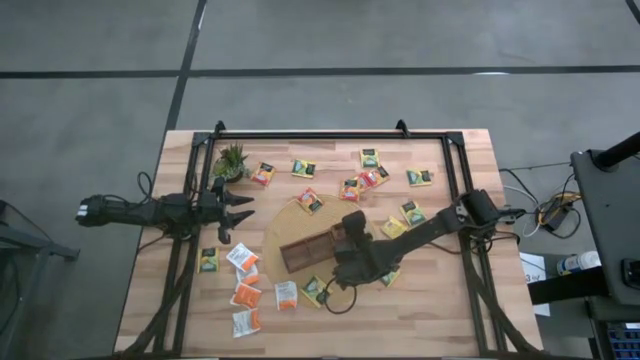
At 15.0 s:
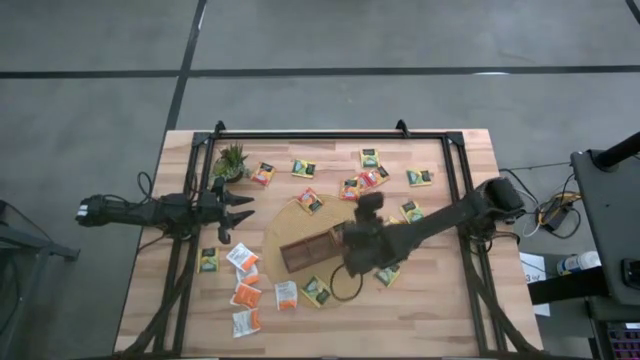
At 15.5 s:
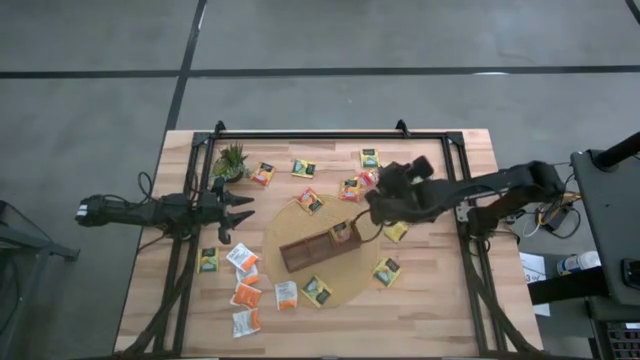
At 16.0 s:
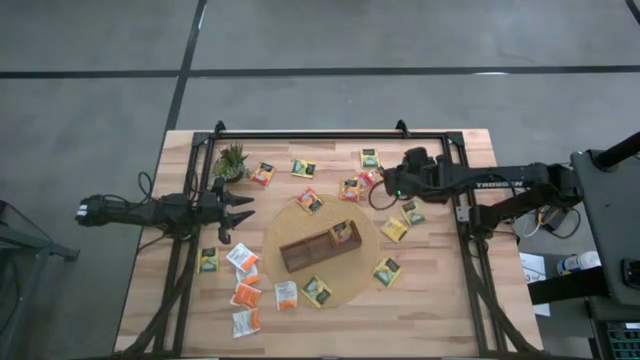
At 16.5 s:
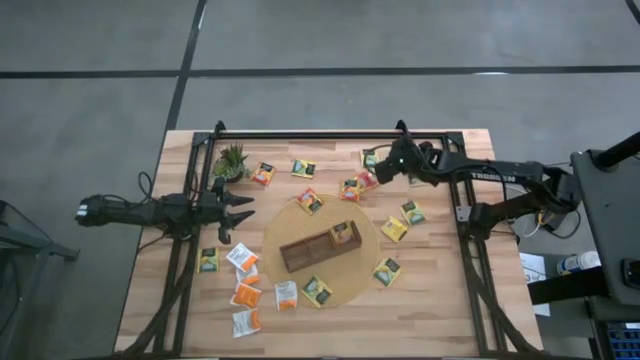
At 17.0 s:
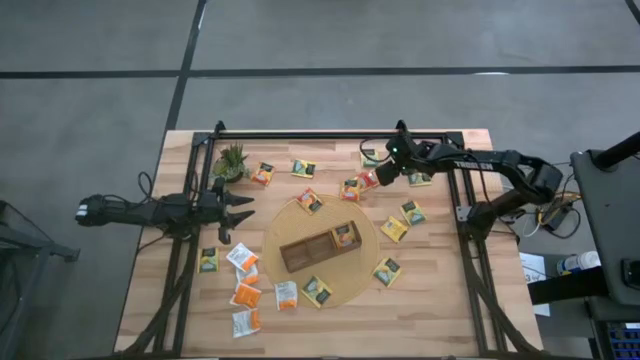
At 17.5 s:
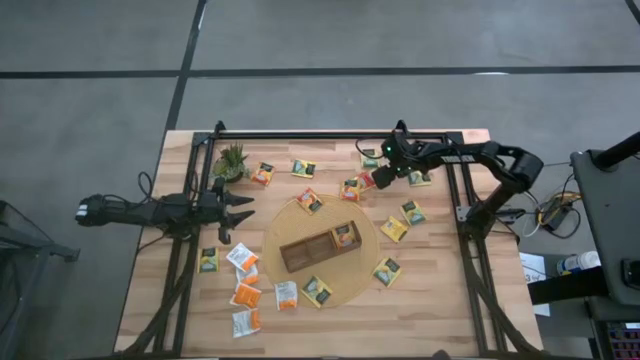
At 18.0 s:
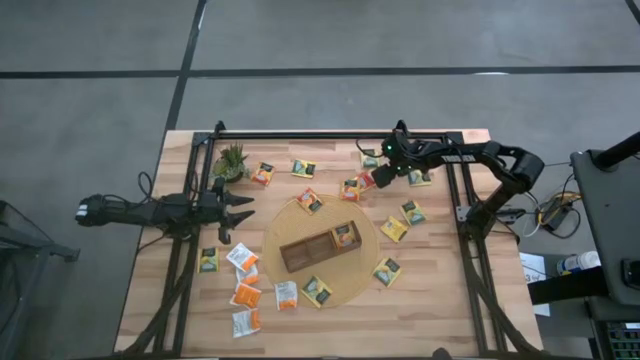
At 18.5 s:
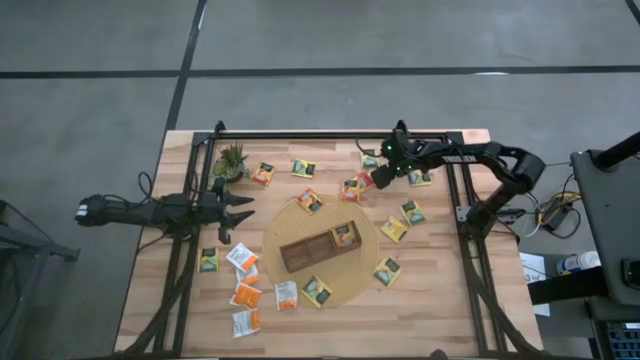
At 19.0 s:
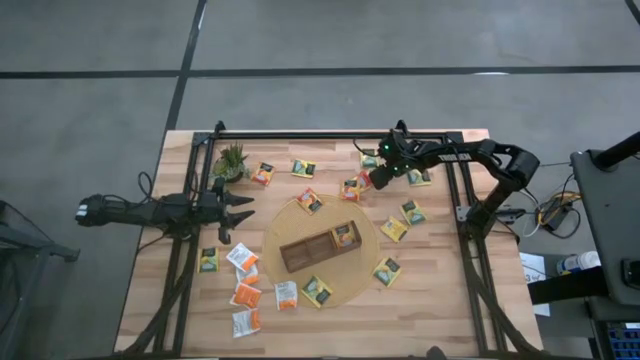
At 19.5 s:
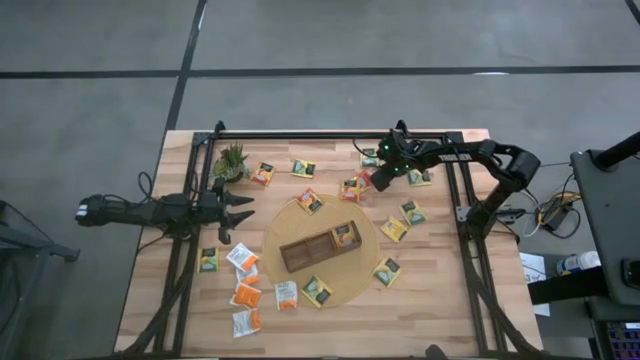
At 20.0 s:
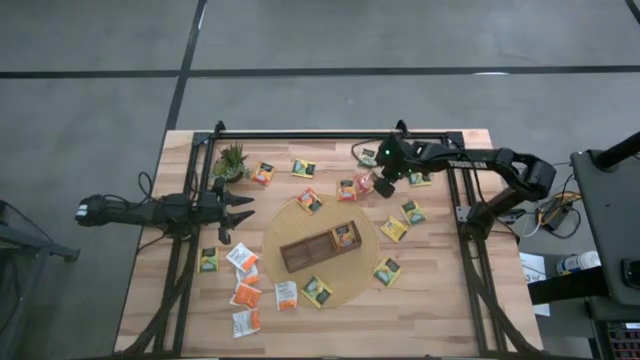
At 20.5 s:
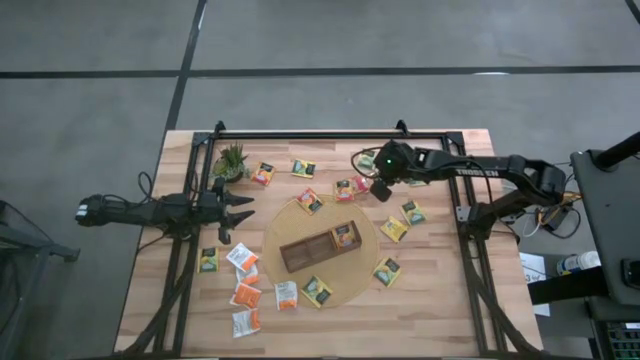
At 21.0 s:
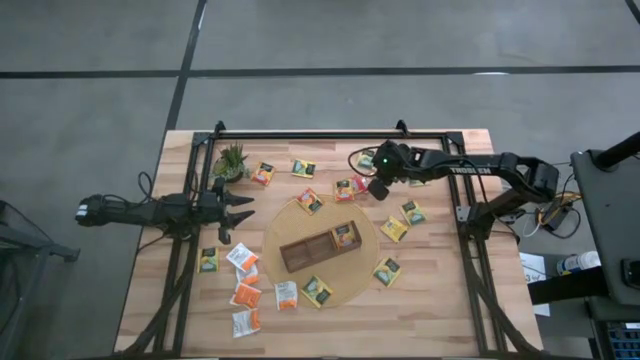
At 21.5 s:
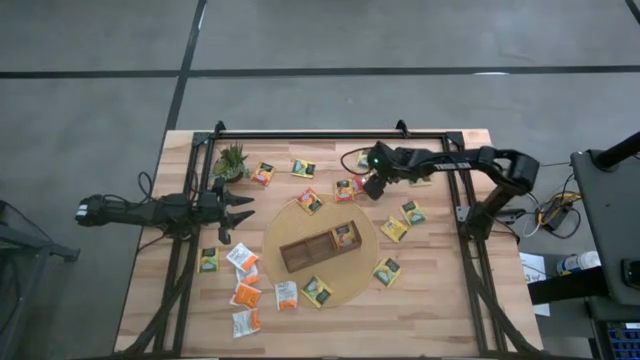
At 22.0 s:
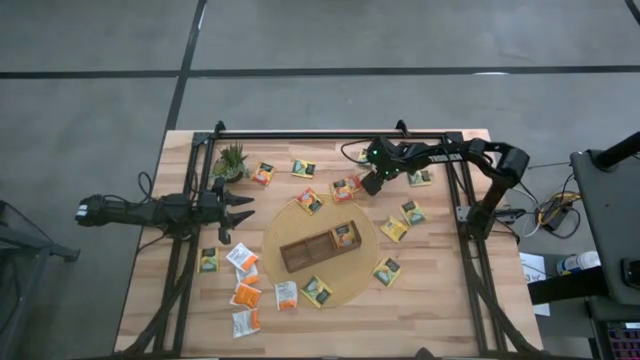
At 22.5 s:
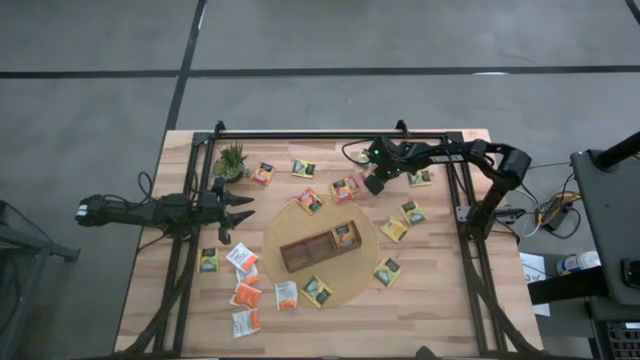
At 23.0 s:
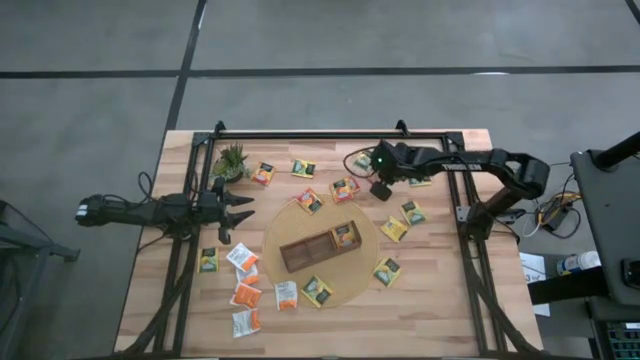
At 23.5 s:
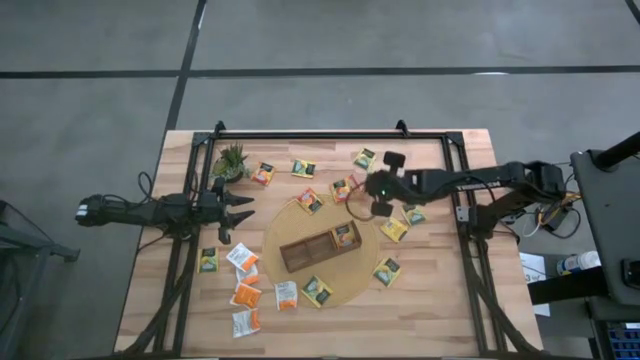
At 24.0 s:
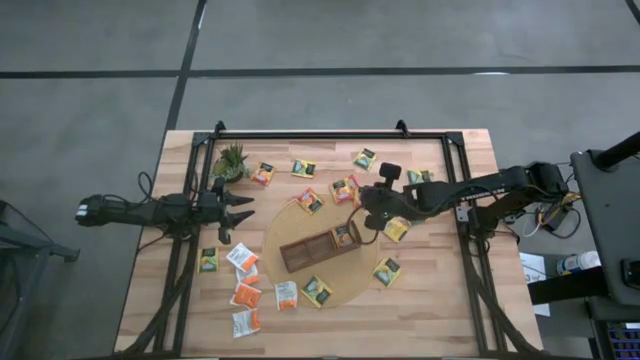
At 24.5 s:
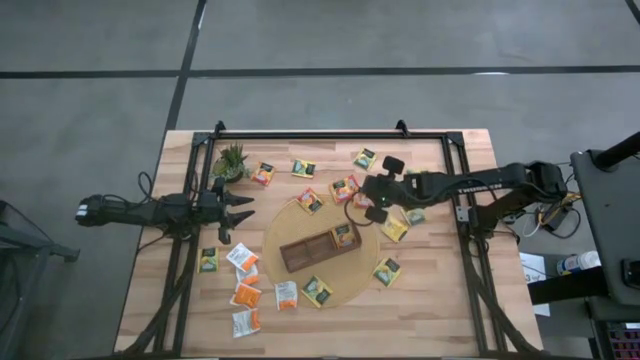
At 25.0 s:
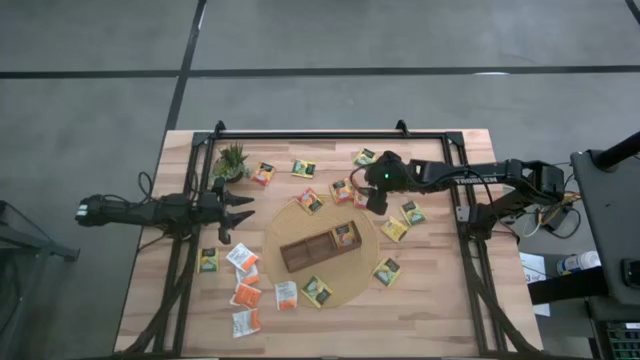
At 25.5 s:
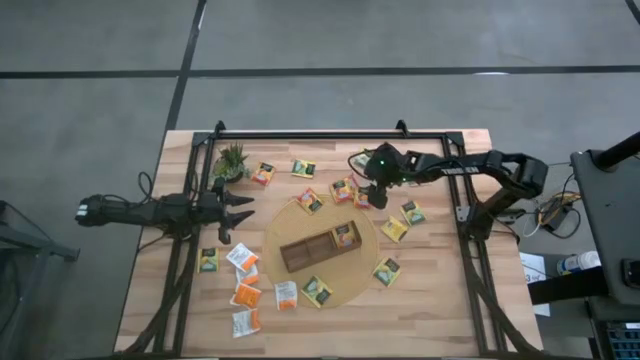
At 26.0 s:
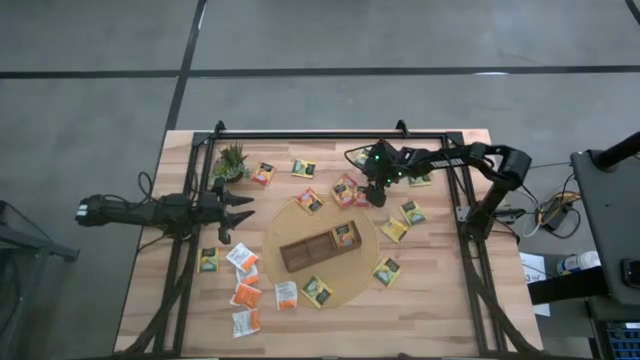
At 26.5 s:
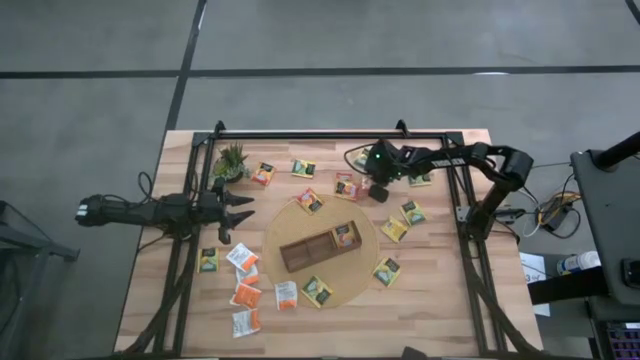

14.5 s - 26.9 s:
Task: Pick & Place Tea
Put the orange tea bag into the right section of the wooden organizer

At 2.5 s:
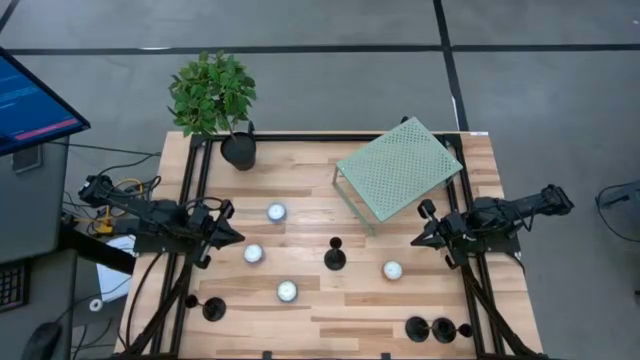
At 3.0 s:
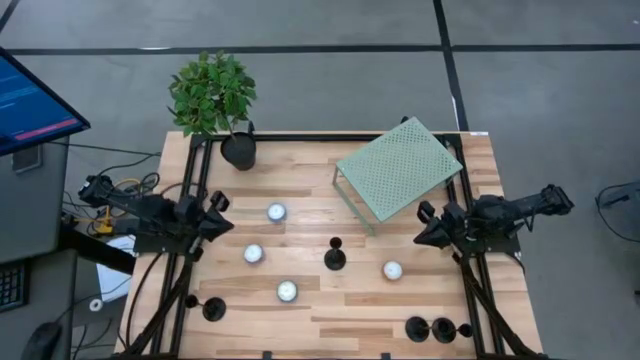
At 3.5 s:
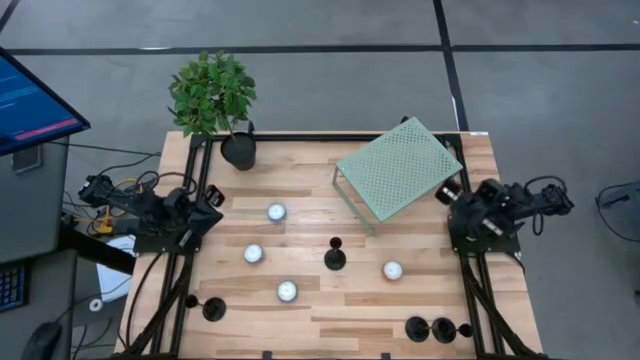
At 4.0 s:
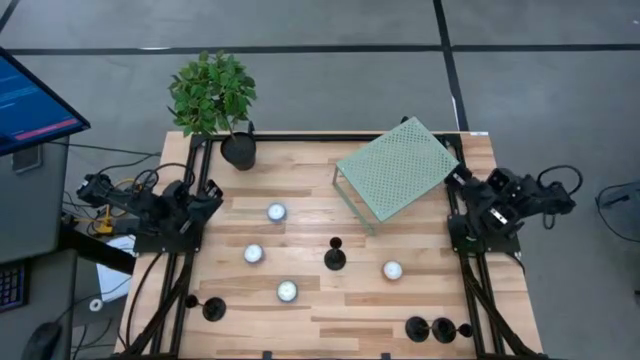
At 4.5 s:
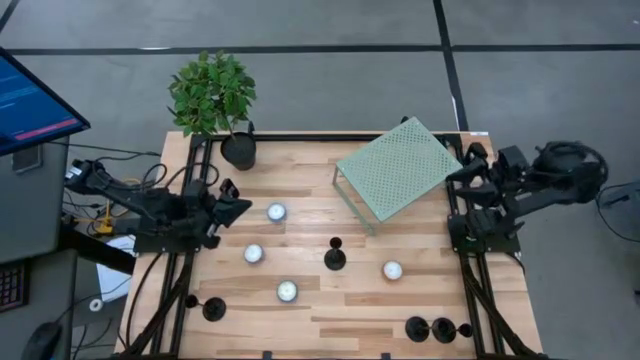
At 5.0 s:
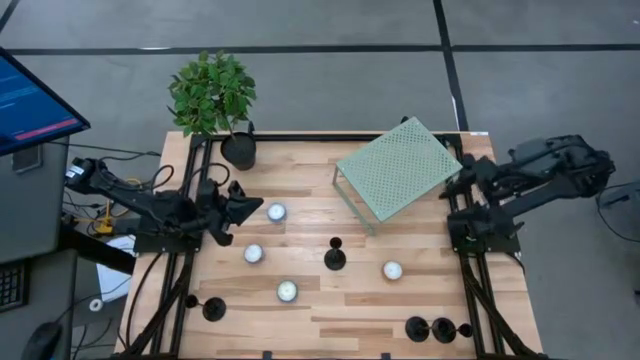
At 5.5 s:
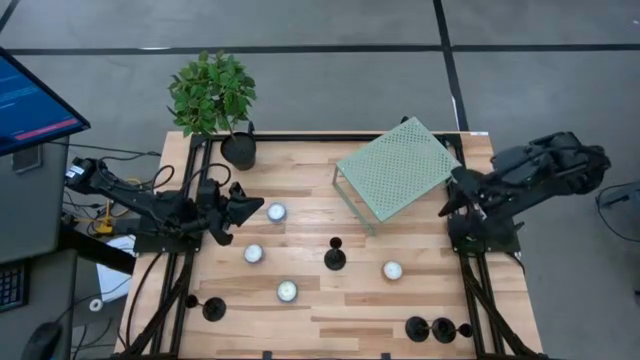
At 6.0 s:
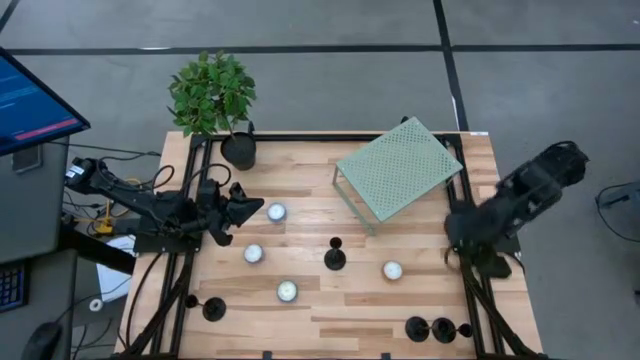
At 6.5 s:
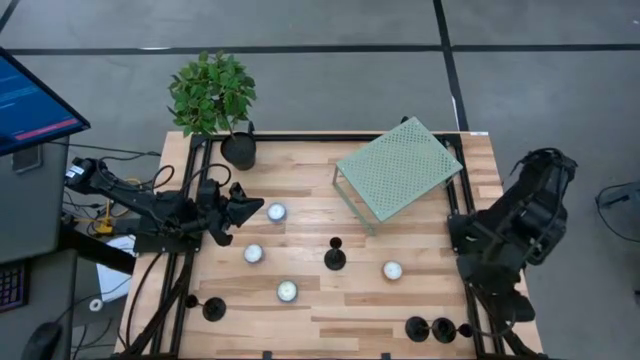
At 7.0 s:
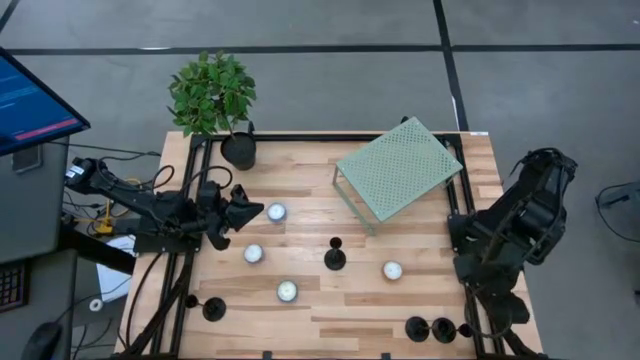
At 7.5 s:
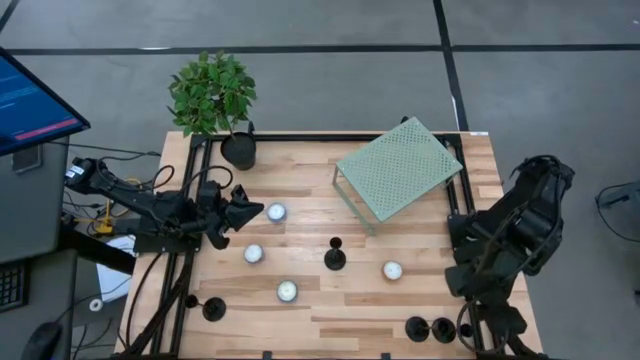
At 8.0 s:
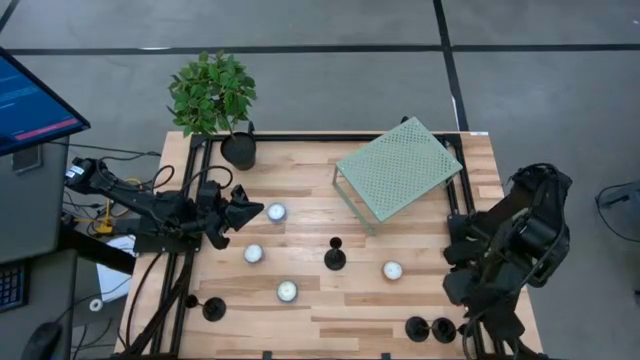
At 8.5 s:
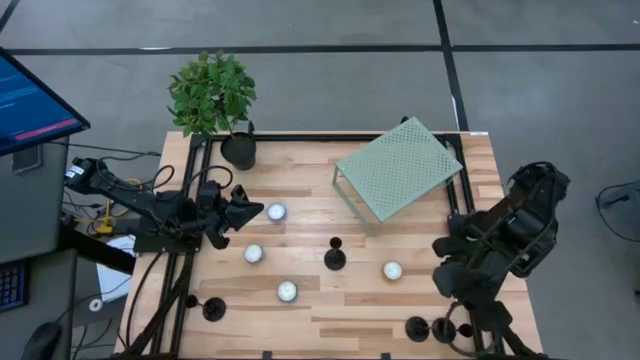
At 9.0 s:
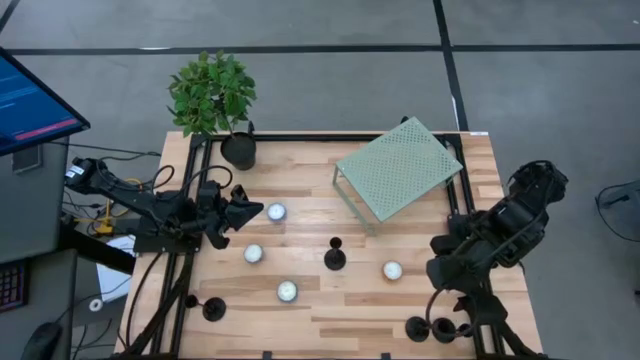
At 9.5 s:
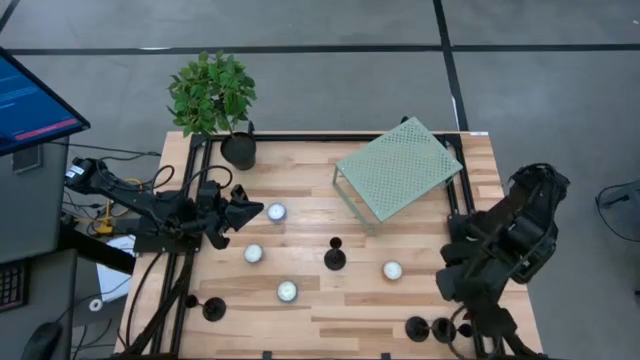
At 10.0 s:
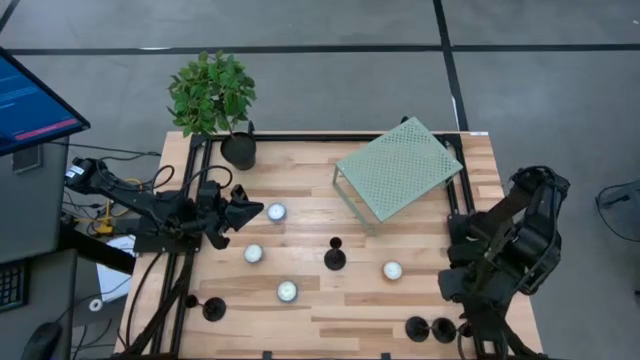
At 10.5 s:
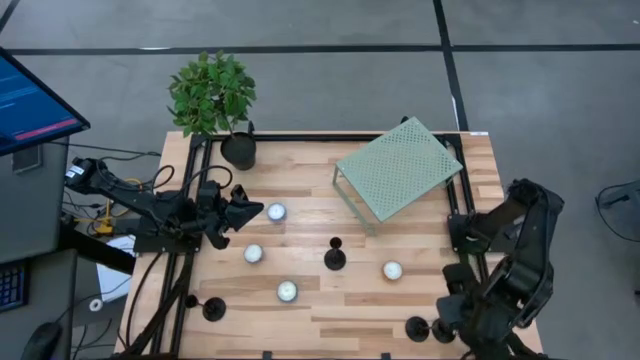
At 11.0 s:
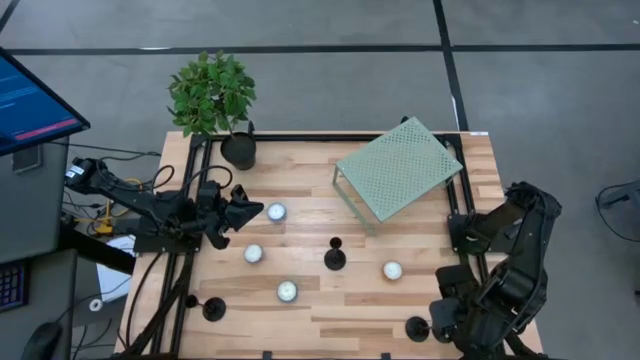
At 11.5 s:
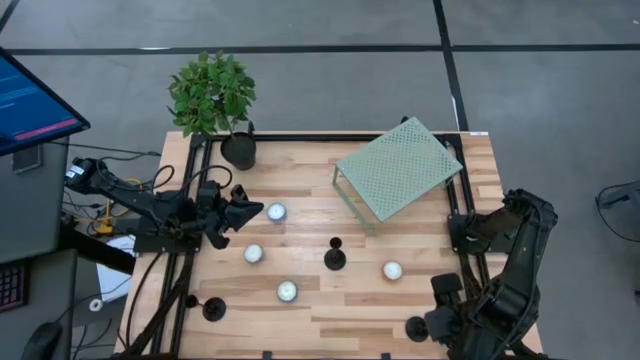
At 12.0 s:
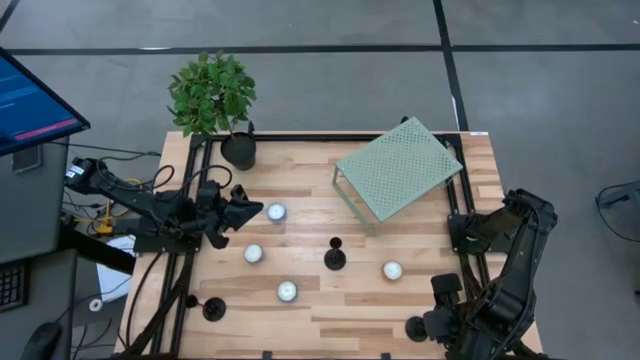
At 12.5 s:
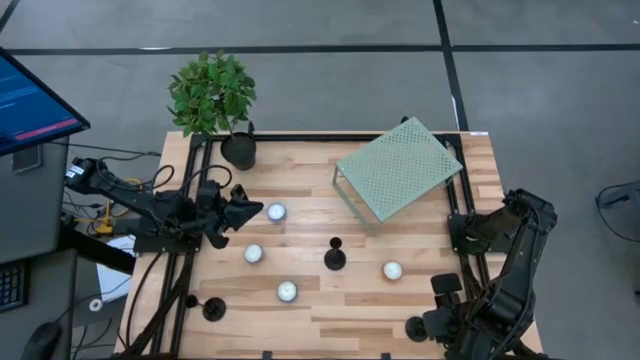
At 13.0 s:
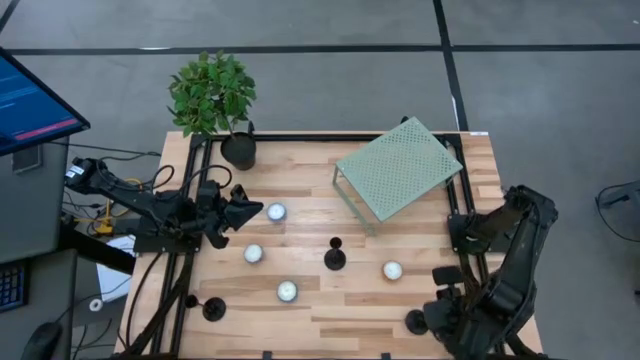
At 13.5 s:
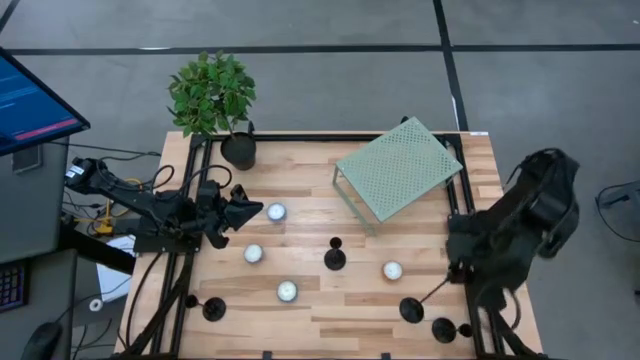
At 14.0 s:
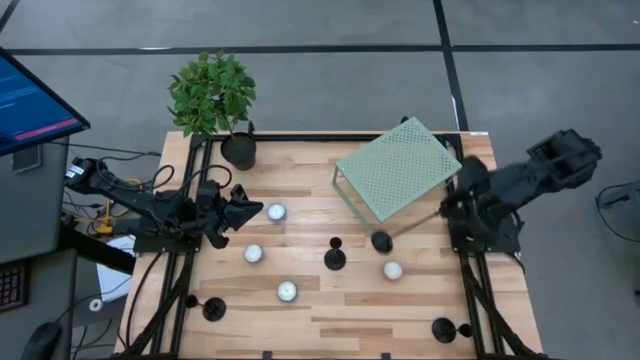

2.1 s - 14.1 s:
Task: Pick & Place candle stick holders
Put the black candle holder on the shelf
